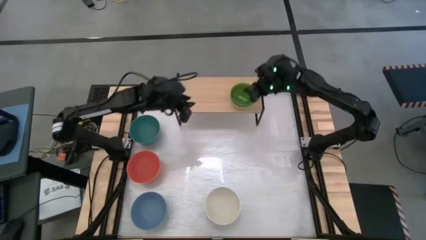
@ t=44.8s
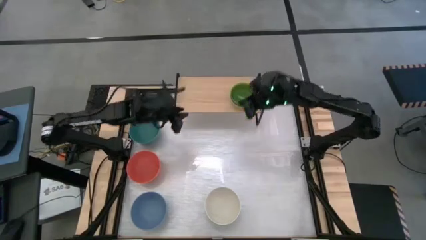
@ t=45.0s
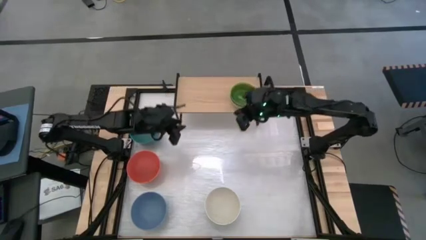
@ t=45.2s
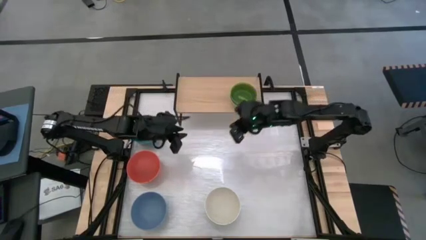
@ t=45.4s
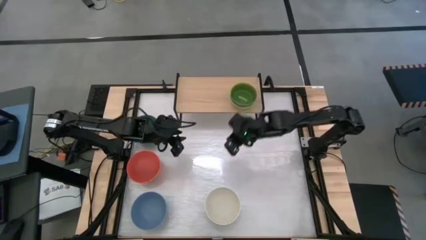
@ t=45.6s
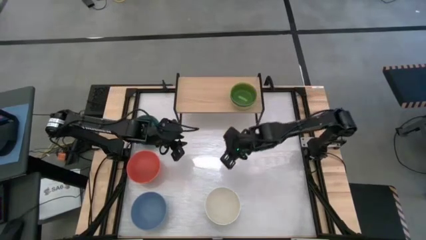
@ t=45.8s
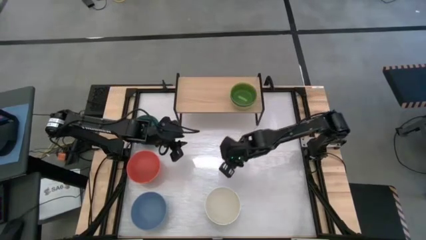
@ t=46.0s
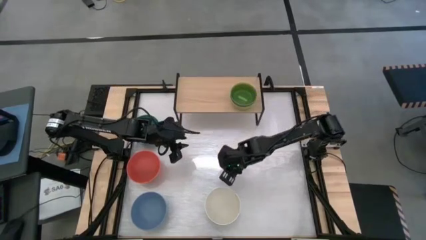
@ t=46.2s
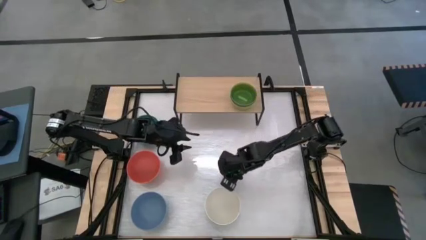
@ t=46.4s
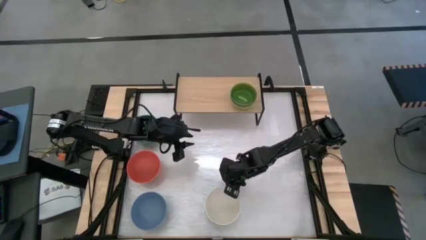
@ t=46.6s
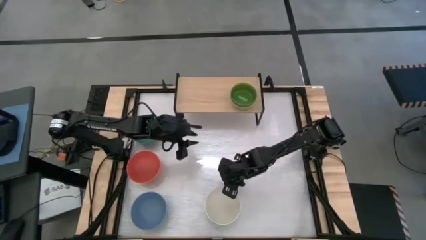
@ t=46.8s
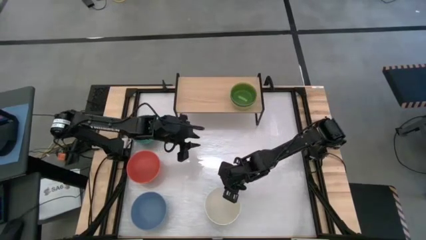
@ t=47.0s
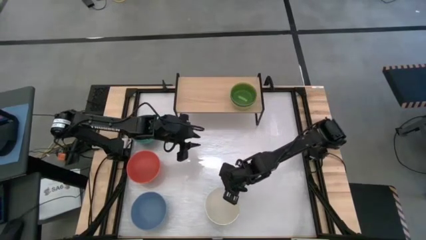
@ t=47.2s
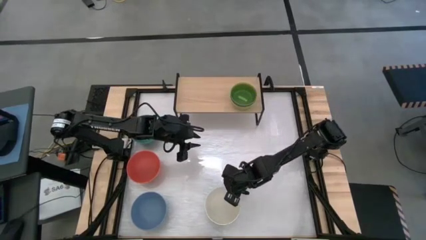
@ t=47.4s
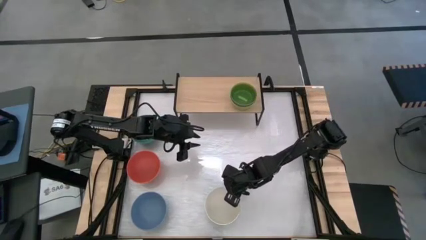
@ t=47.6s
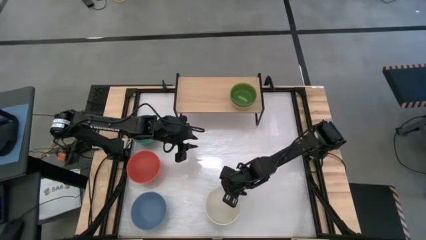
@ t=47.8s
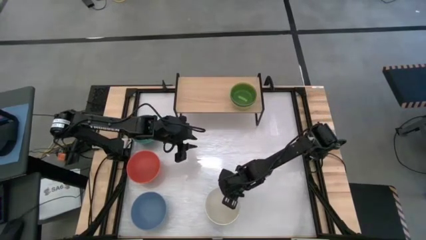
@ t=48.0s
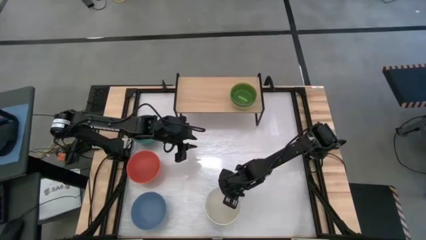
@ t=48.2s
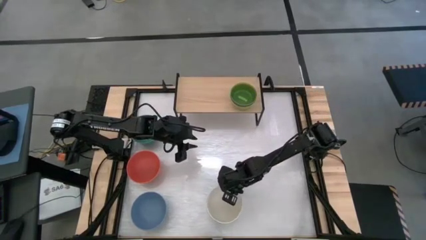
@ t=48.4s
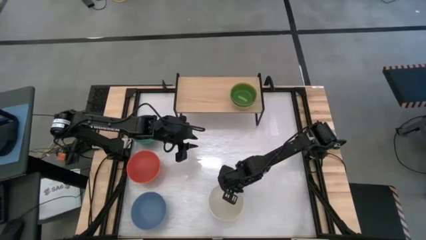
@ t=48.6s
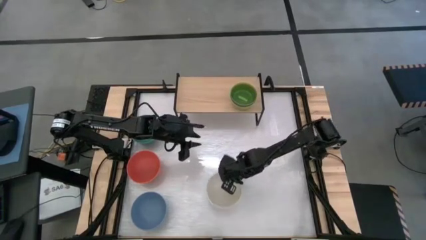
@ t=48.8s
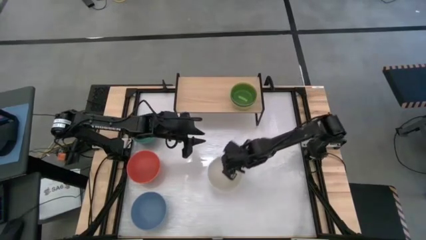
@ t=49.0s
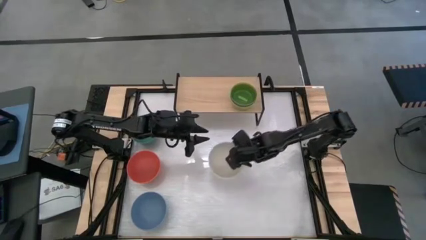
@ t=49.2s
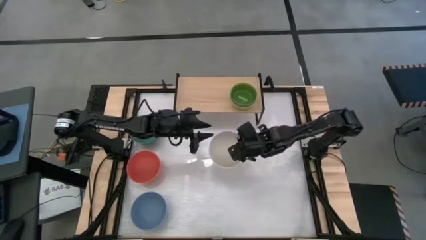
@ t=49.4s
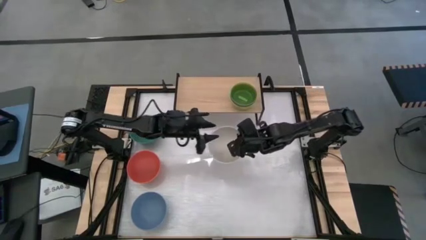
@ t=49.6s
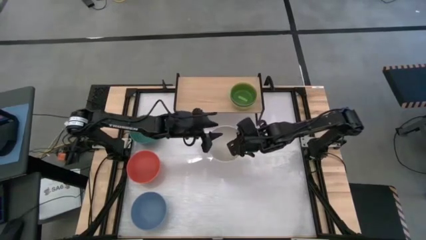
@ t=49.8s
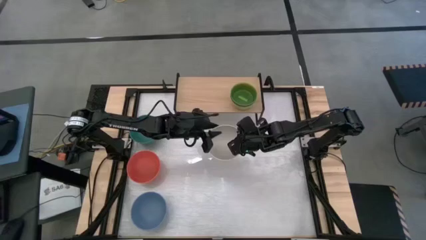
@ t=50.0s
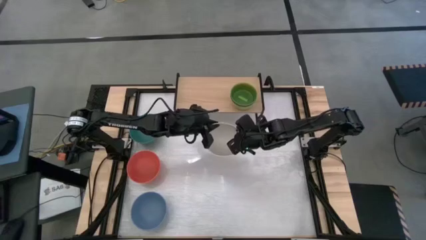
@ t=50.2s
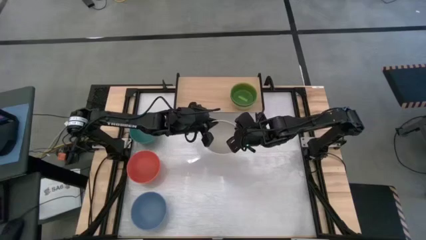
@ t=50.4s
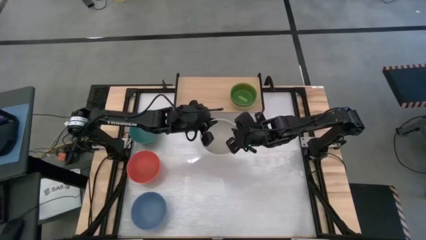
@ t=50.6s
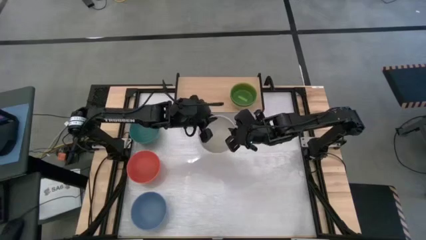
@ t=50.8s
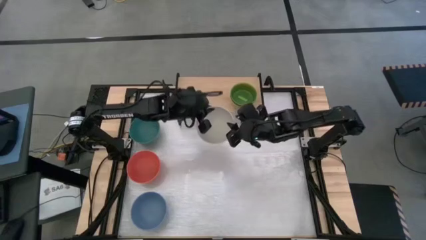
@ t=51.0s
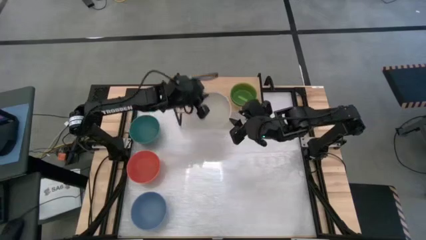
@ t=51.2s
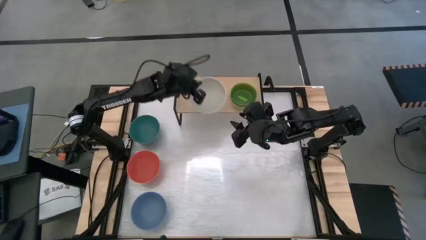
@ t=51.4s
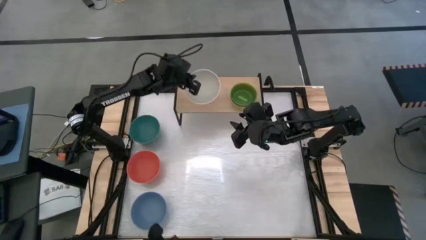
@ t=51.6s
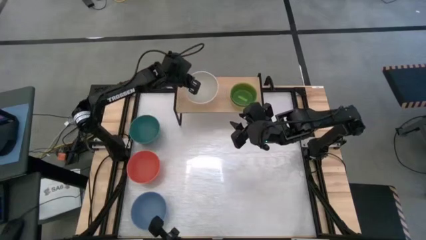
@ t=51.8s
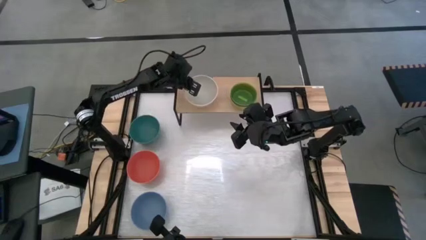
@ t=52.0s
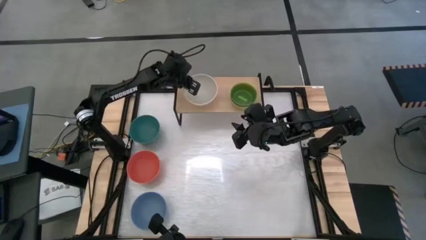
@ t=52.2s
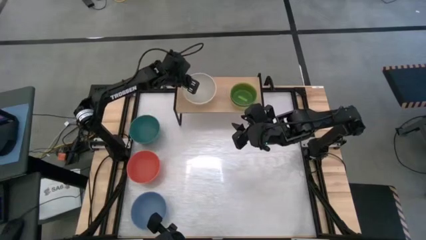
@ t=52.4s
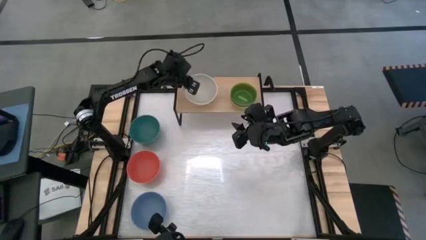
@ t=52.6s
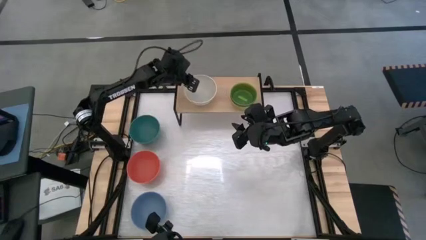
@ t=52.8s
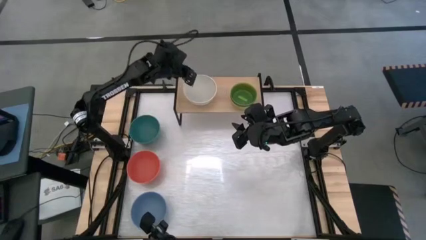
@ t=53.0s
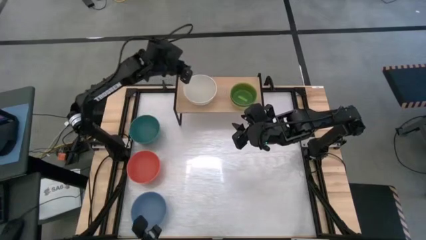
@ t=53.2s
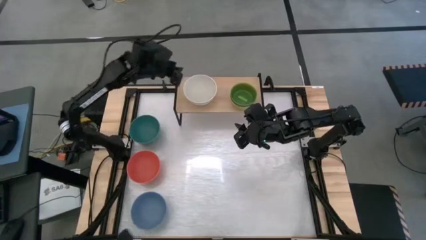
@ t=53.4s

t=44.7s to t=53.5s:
Task: Place and stack bowls onto a shelf
Put the white bowl on the shelf

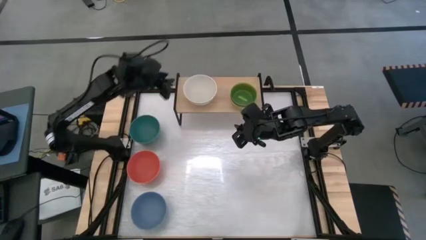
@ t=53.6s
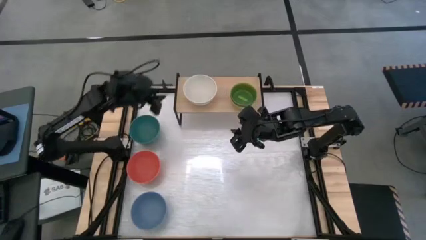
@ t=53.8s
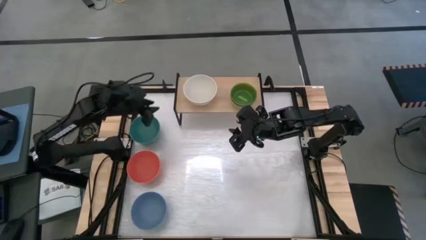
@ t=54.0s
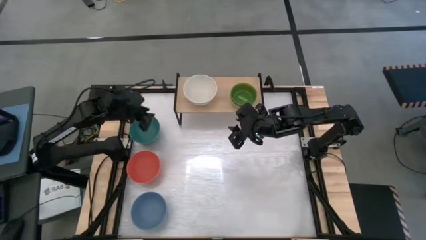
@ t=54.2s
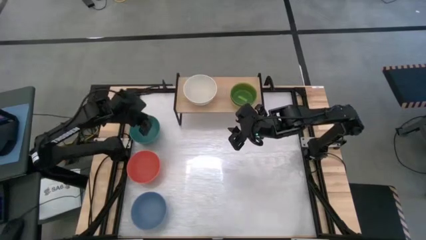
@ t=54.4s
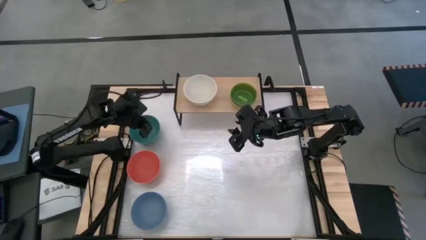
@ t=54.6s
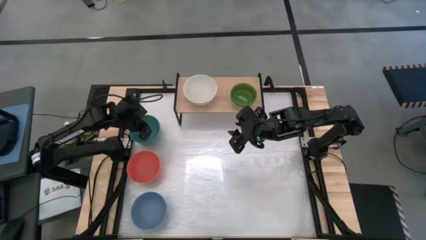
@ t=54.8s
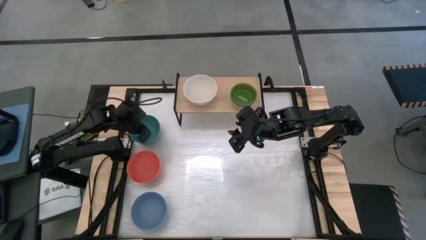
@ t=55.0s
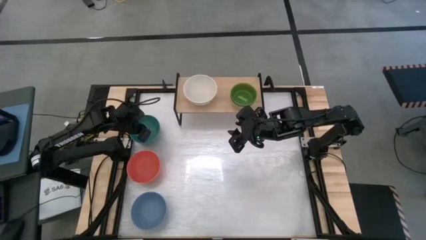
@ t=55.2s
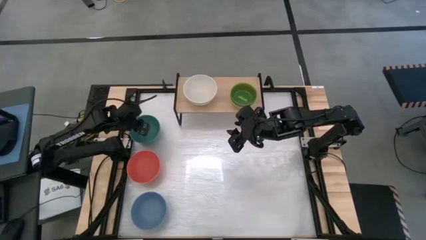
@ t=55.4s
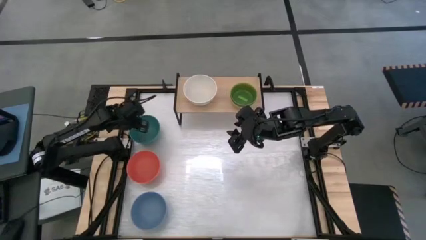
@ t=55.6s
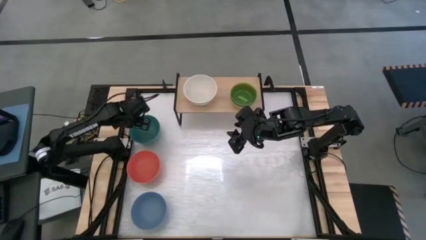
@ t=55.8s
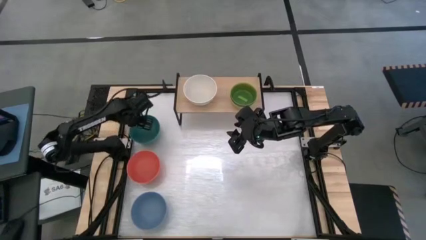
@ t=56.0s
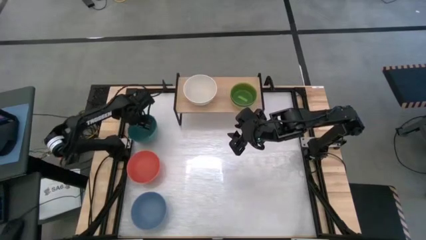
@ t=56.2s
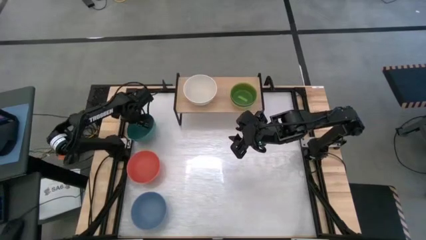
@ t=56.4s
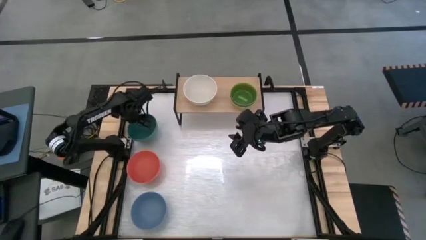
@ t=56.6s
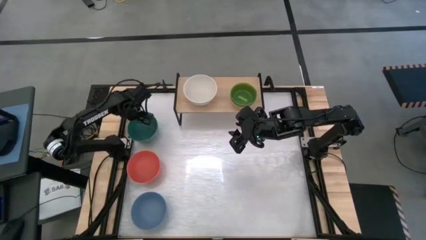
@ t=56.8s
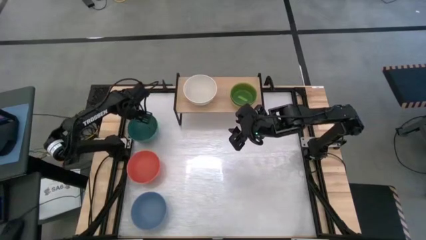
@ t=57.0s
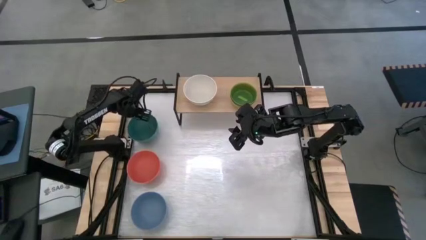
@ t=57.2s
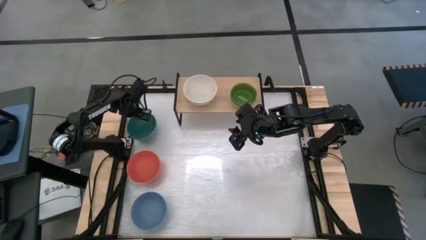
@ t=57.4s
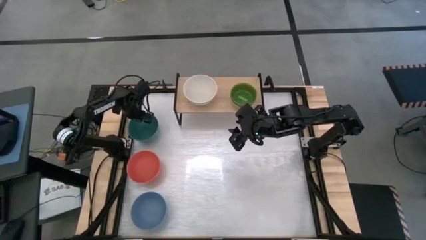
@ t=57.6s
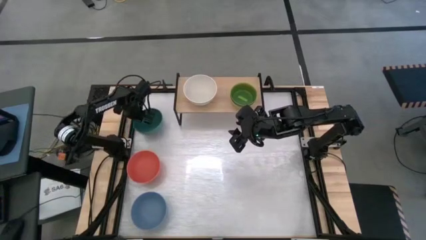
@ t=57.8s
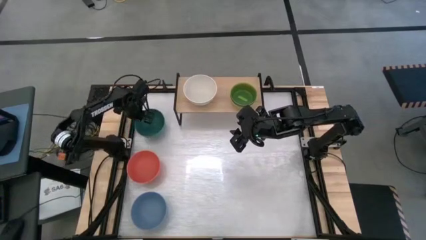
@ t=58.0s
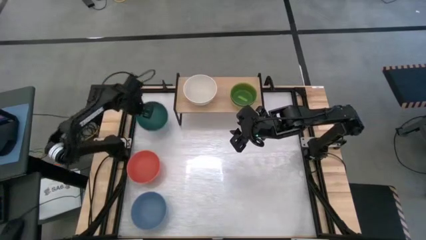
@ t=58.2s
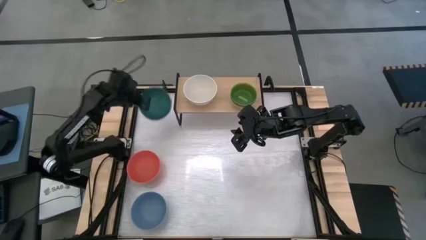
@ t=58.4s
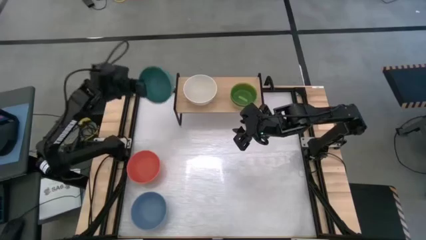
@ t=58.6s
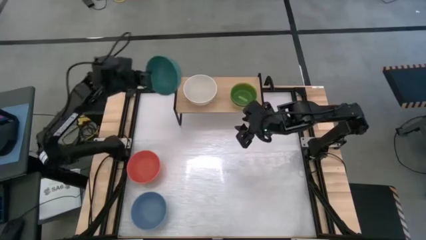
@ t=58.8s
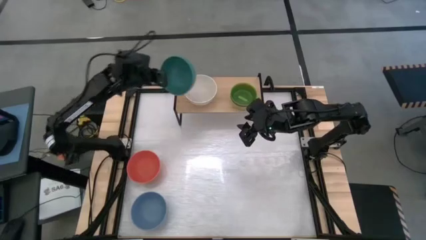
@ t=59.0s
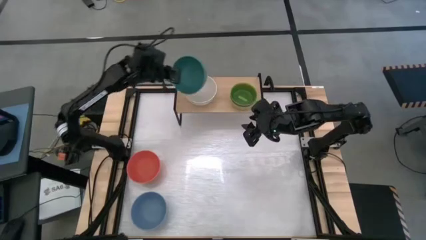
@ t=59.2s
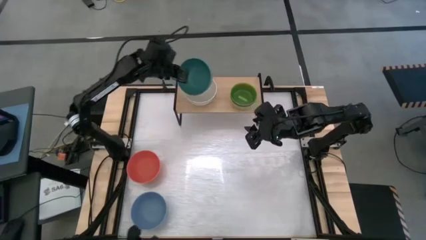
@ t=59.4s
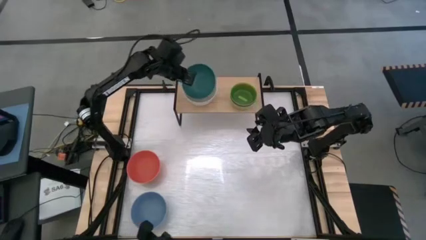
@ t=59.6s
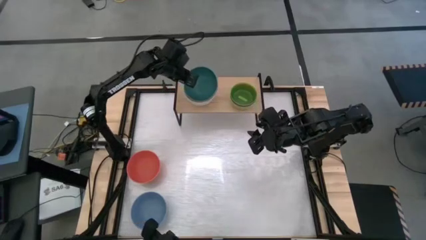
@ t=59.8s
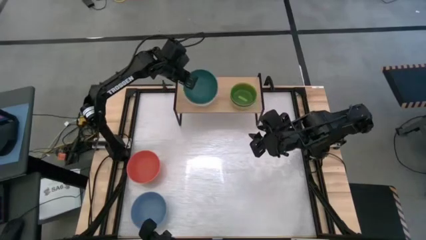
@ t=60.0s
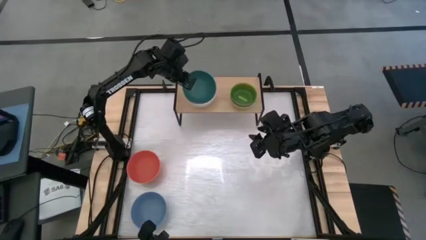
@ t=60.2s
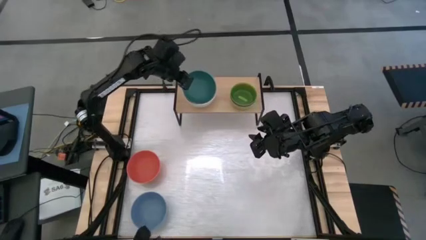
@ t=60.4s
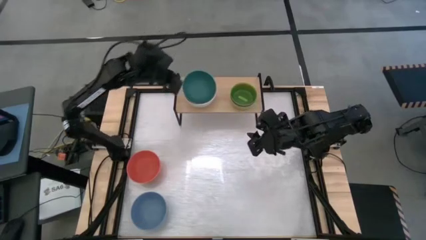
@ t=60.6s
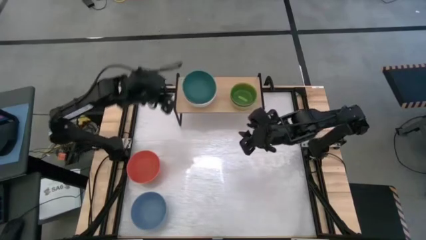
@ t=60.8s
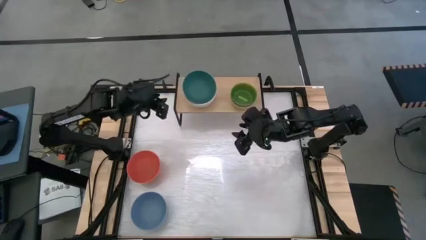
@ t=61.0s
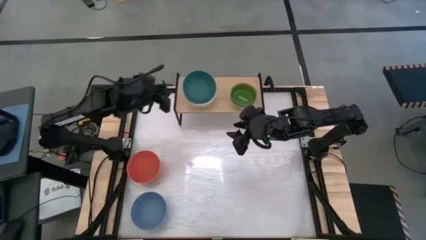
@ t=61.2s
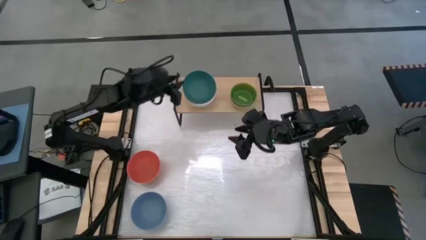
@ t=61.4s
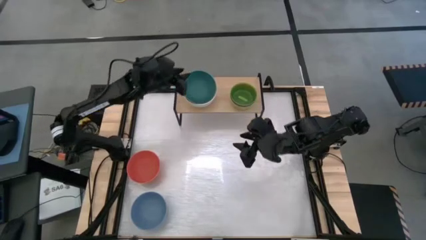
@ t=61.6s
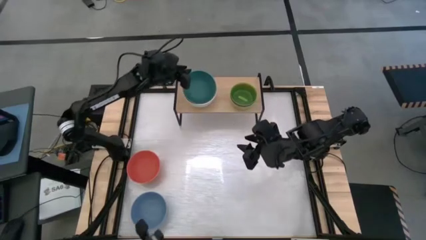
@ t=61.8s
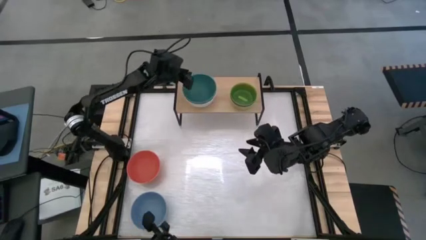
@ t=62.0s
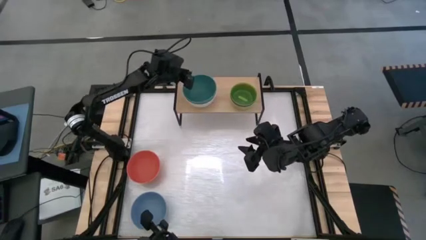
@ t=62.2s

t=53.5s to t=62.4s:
Stack the dark green bowl on top of the white bowl on the shelf
